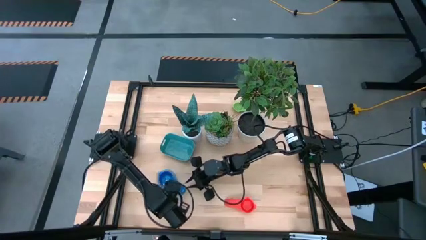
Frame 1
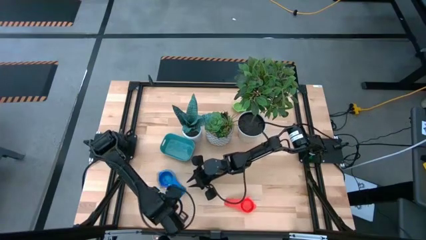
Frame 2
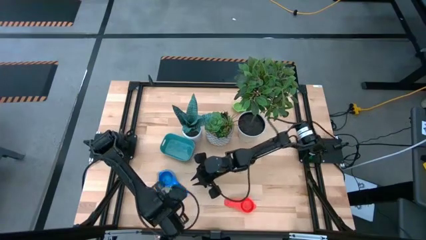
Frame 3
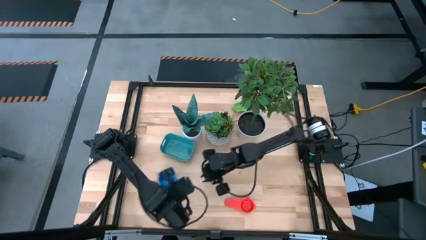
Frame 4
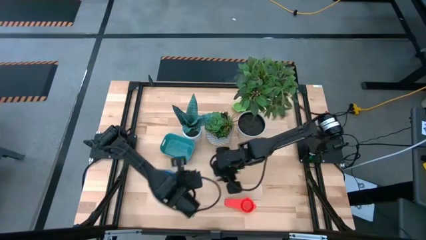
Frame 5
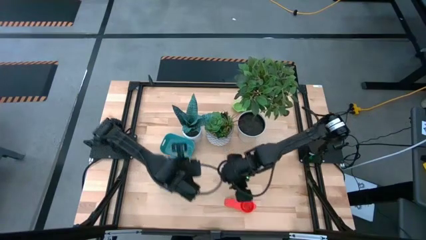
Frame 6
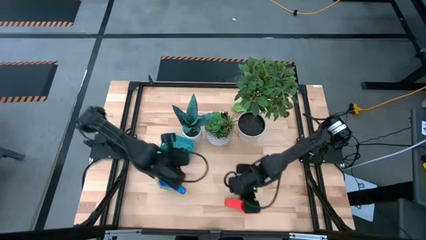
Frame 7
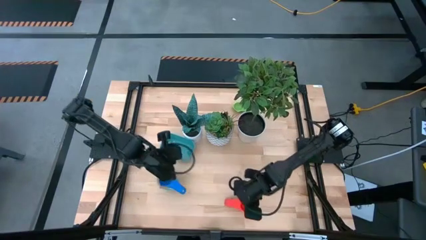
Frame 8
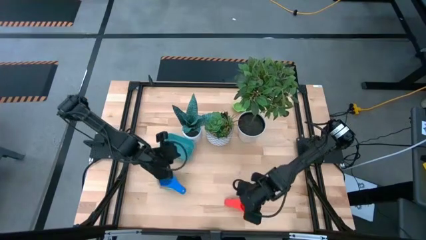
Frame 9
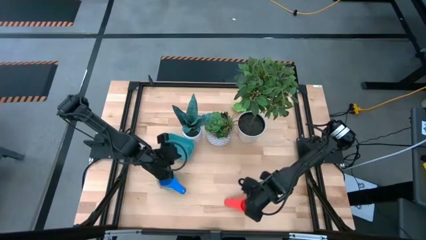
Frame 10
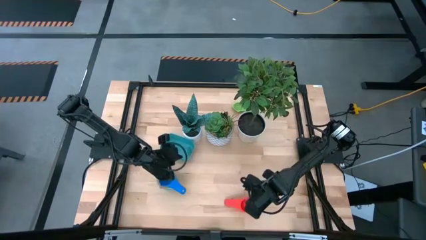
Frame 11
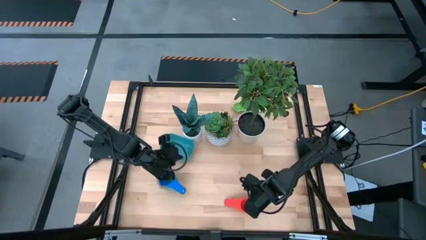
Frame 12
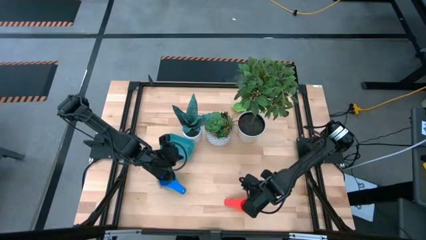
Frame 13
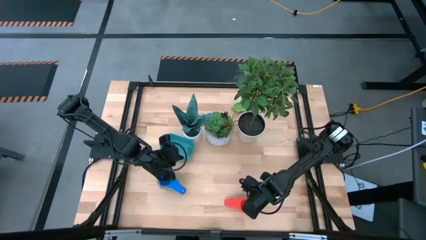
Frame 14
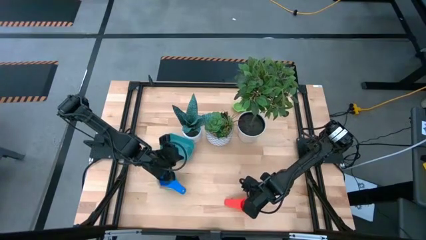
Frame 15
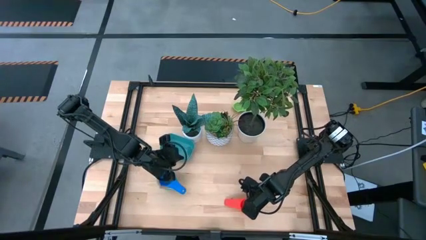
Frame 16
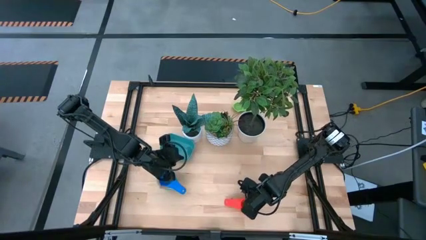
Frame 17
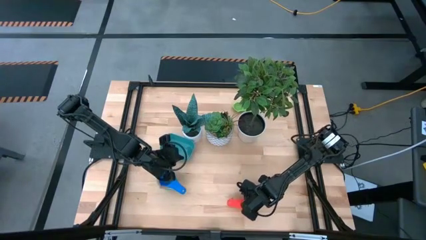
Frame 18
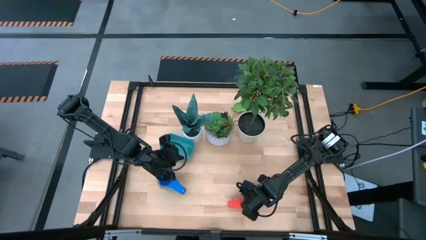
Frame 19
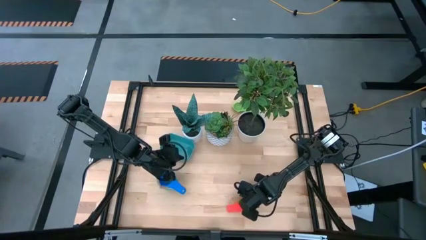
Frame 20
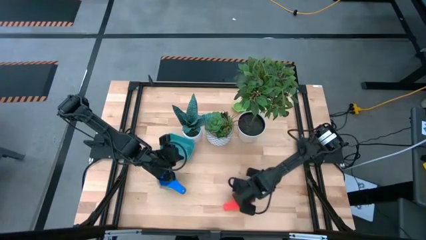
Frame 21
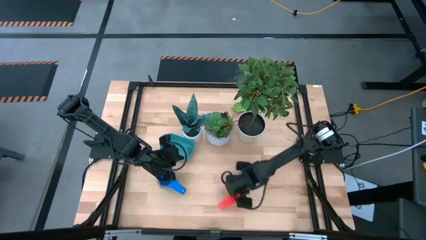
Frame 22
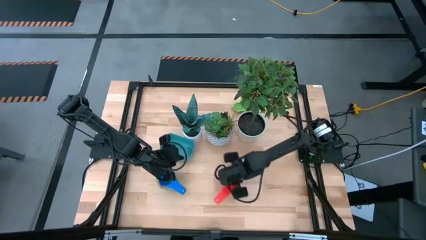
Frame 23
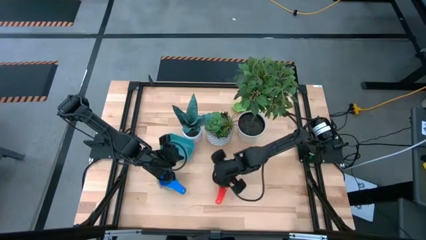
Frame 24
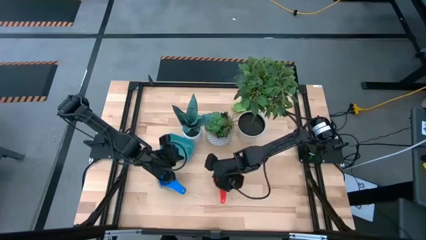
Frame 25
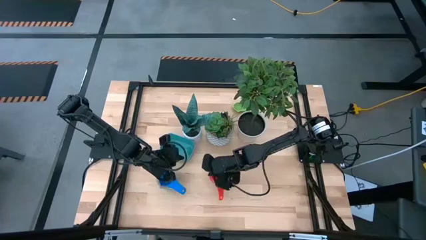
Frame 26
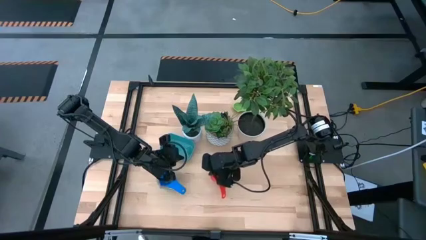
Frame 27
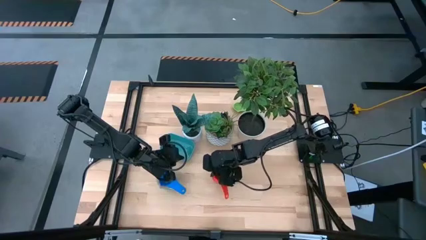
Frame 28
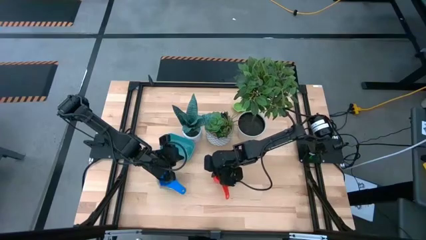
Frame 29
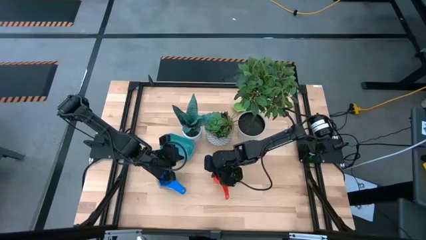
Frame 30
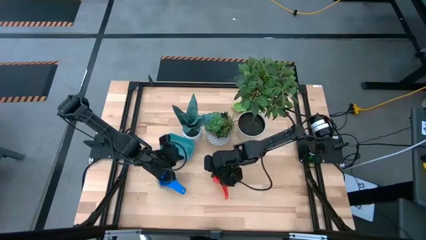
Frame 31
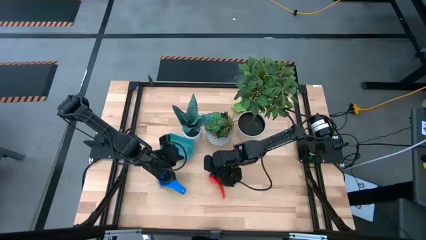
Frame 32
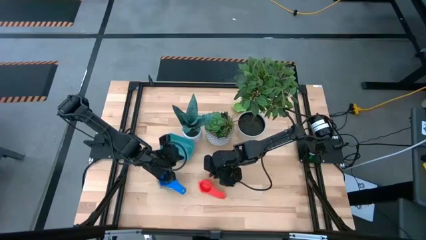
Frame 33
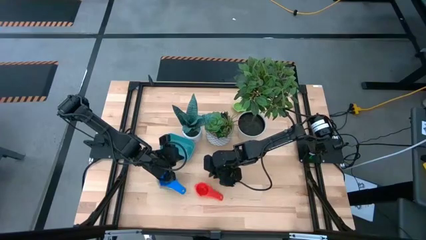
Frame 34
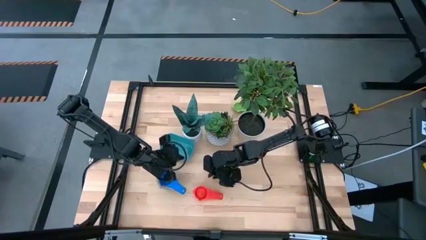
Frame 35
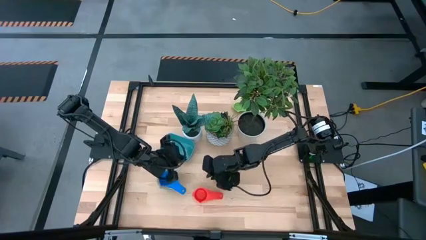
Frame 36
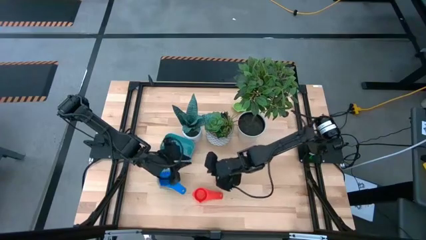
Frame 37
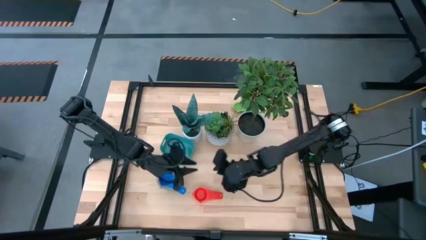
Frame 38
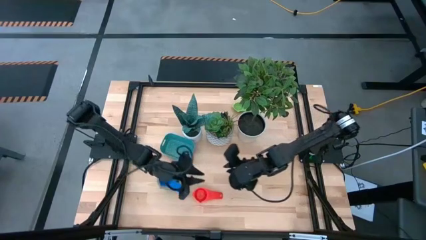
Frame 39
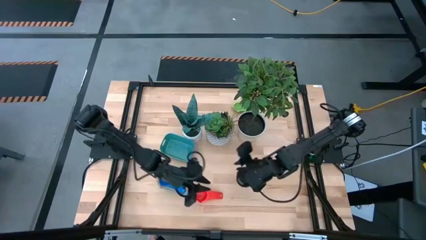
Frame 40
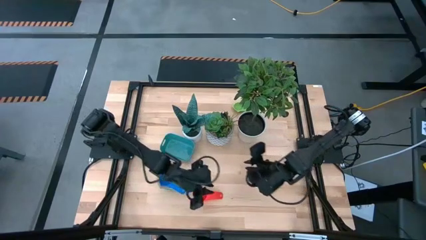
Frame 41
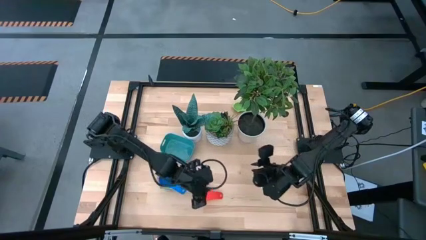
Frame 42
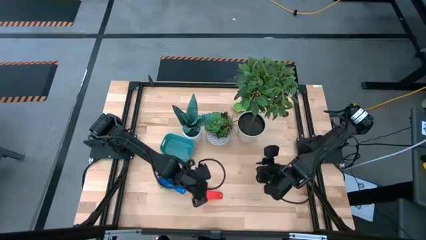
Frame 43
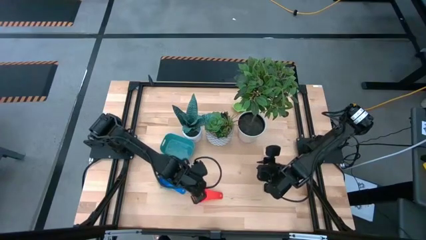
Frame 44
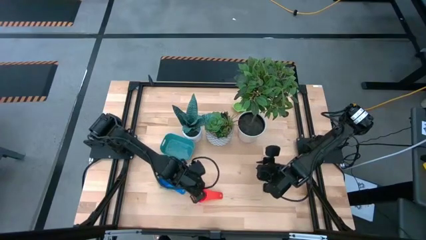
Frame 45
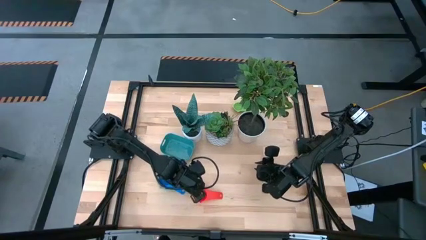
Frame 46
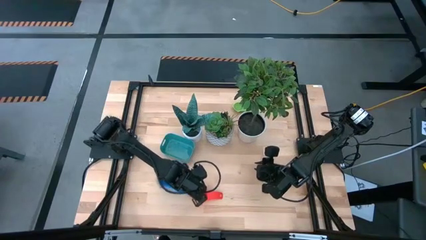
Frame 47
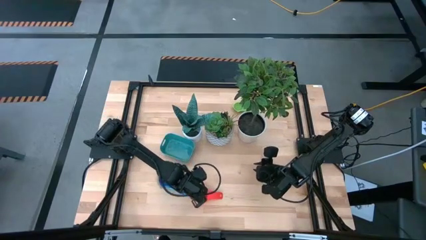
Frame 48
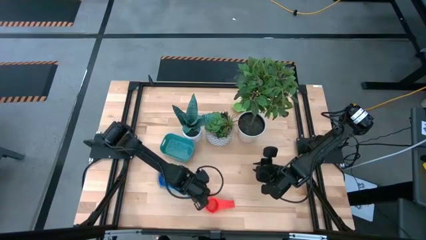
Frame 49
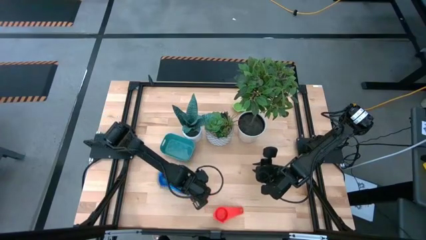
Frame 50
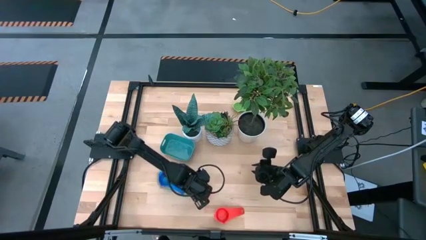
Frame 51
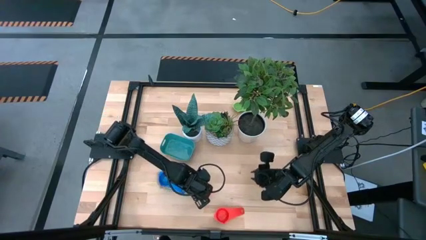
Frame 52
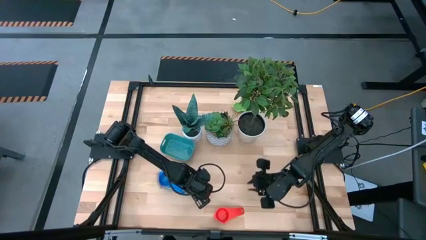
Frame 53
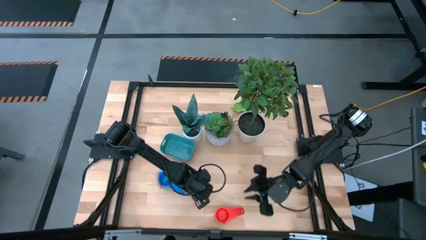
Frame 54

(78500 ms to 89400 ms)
Task: Nest measuring cups in basket
Stack the red measuring cup into the blue measuring cup

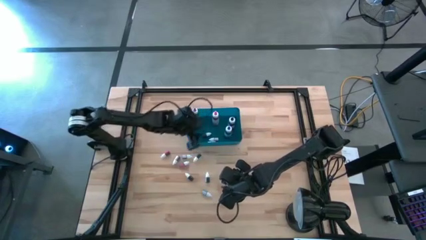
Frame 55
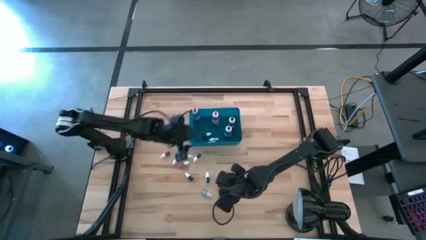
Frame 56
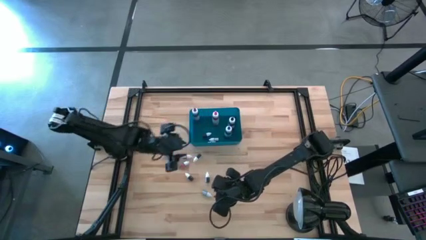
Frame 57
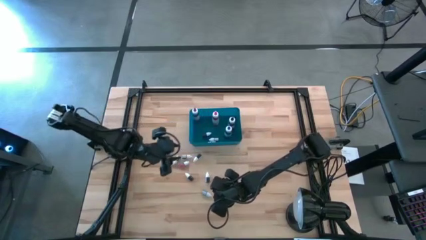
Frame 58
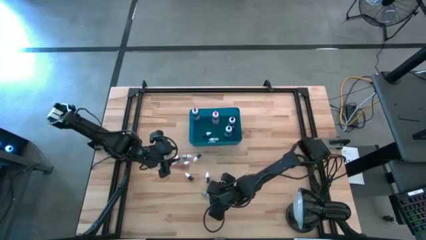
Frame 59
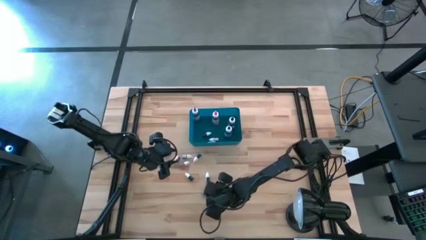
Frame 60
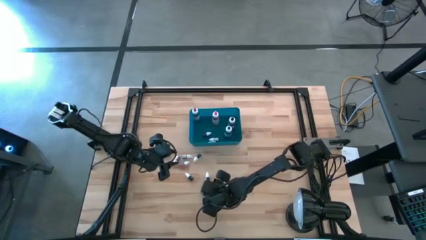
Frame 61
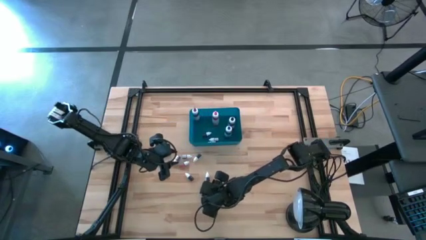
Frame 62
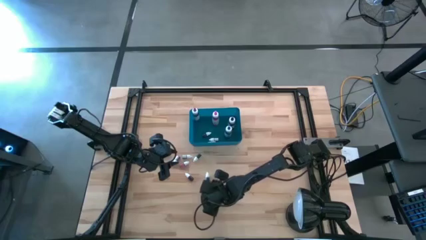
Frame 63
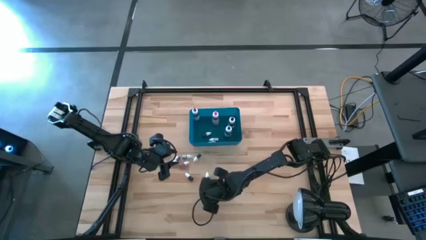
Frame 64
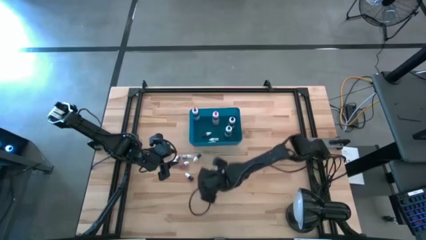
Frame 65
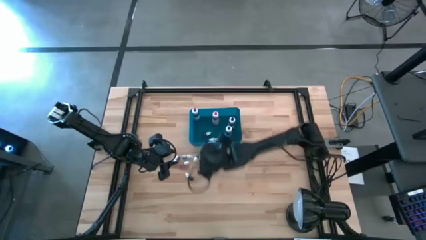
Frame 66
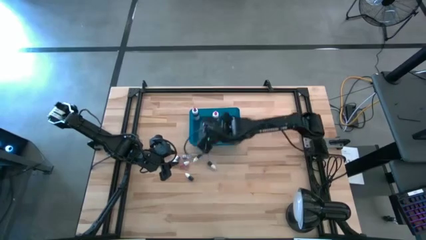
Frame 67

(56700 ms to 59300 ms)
Task: Pick & Place food coloring
Put the small blue food coloring bottle into the bin

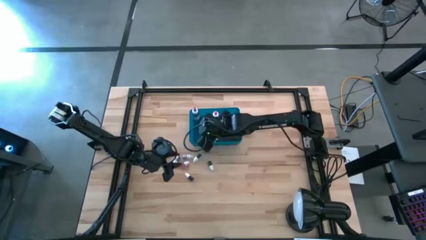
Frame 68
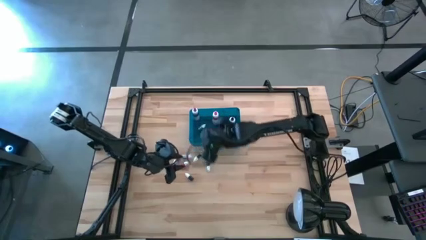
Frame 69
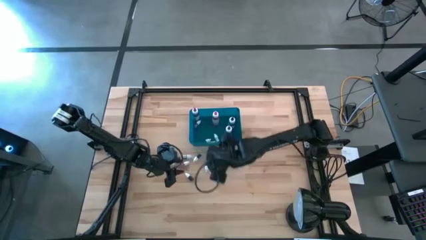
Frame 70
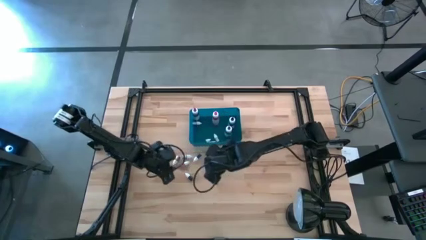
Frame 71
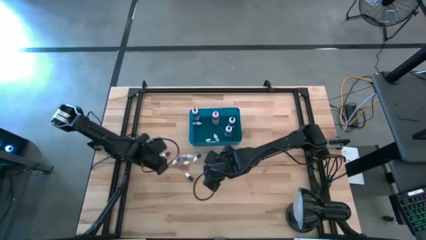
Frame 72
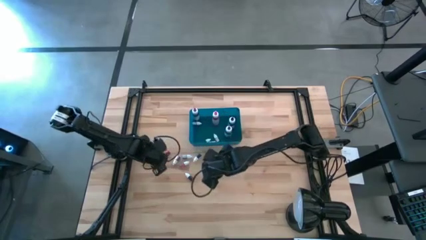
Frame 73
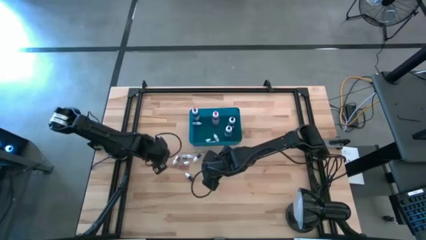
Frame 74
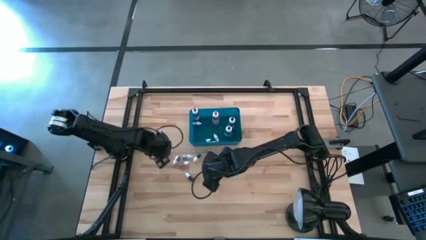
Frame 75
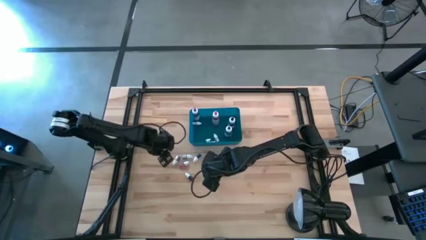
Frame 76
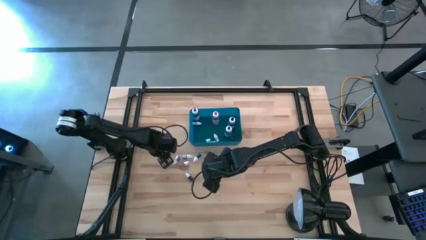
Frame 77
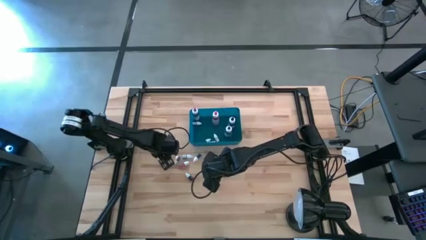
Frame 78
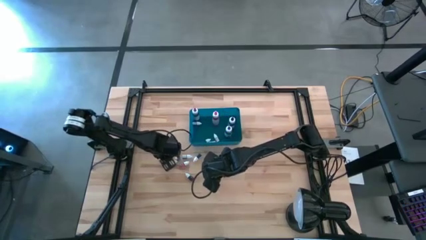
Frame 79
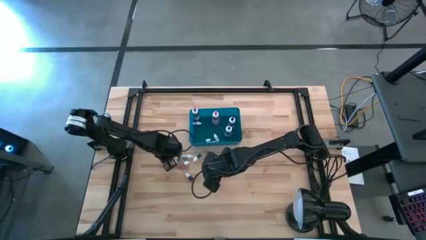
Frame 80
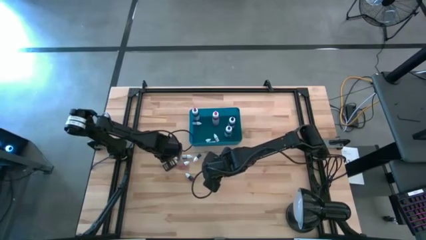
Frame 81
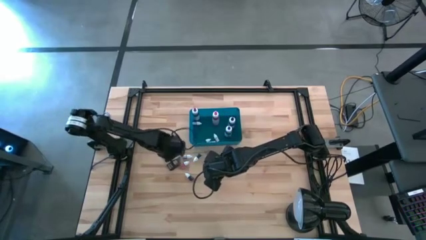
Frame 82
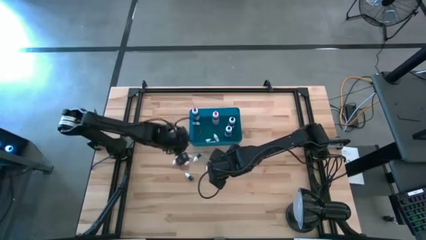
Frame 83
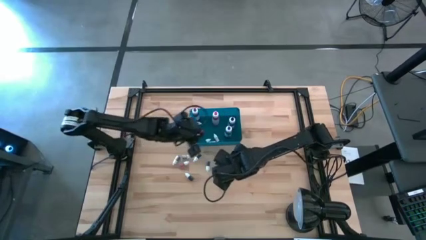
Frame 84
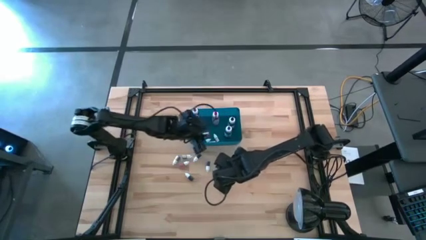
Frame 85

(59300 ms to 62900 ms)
Put the left small red food coloring bottle into the bin

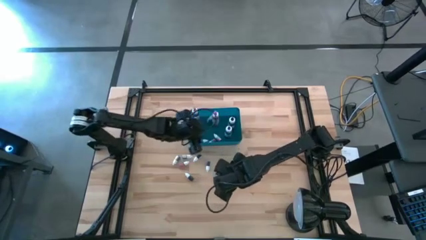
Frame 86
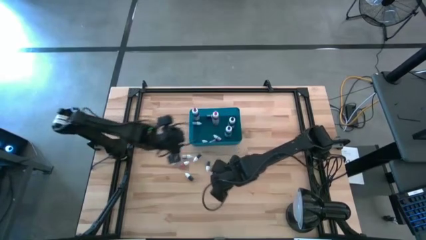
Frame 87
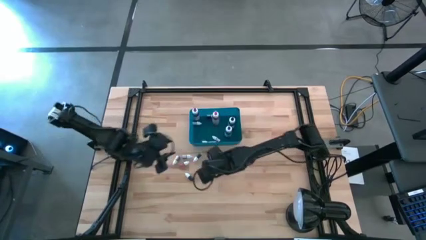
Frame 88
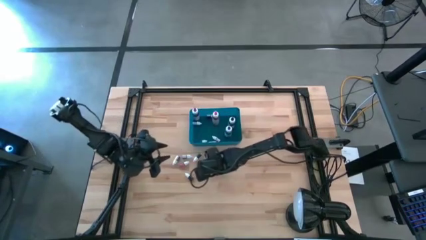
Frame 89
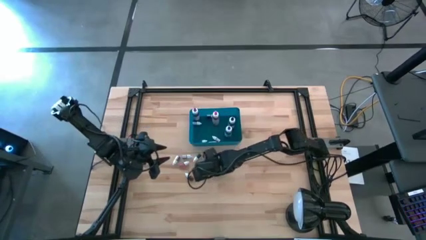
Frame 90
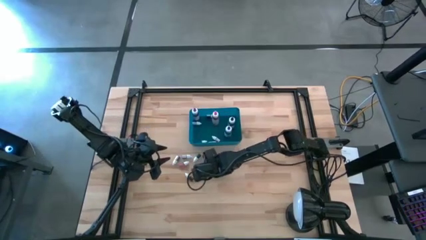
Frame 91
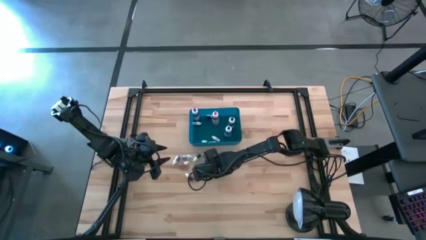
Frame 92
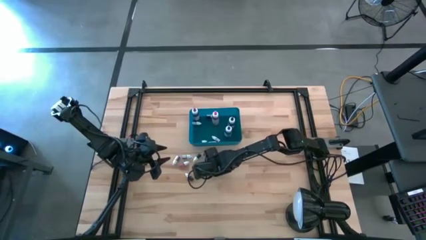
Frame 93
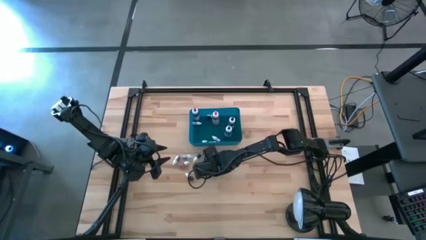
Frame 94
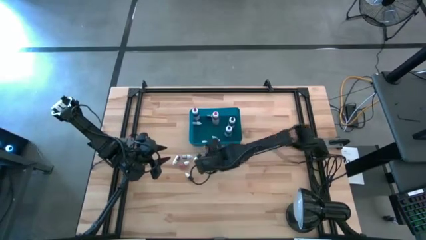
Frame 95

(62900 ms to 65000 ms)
Put the right small black food coloring bottle into the bin
